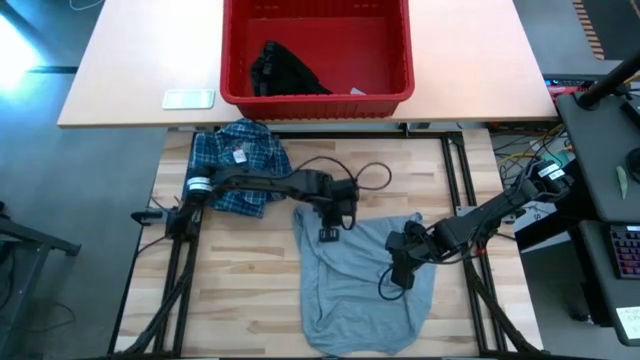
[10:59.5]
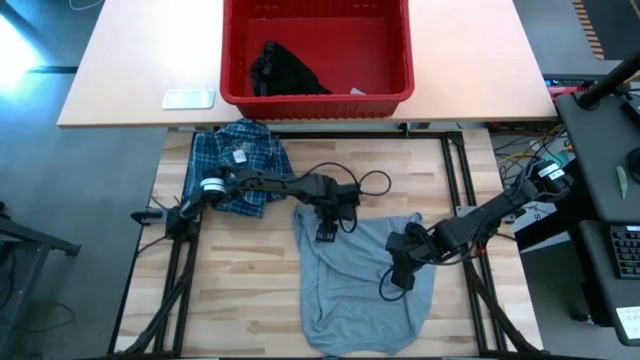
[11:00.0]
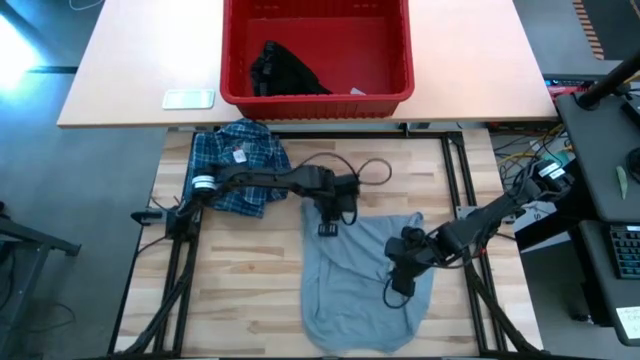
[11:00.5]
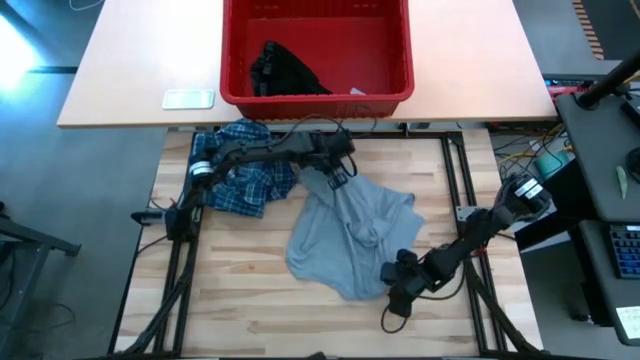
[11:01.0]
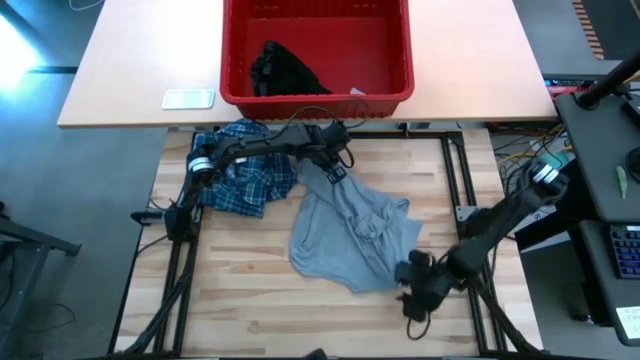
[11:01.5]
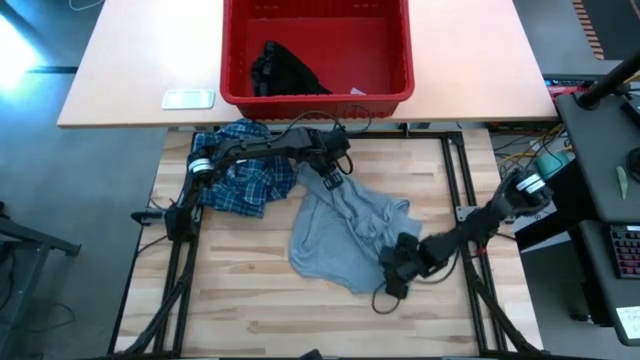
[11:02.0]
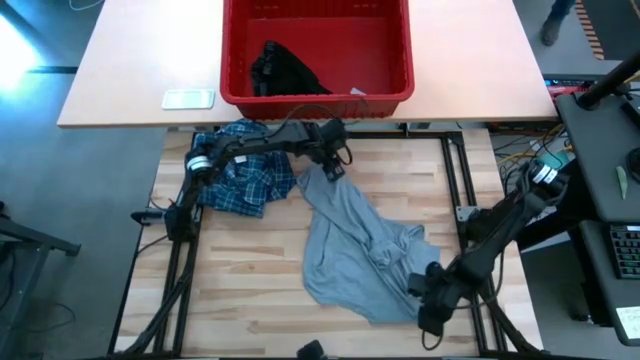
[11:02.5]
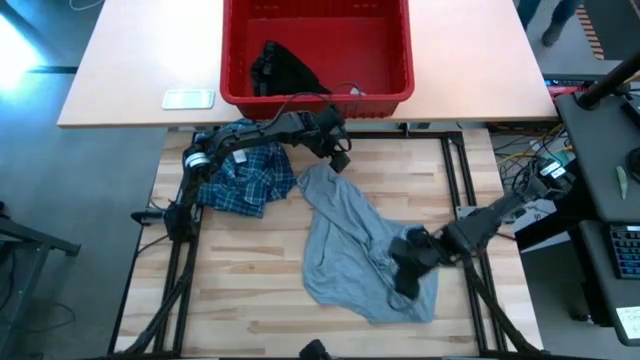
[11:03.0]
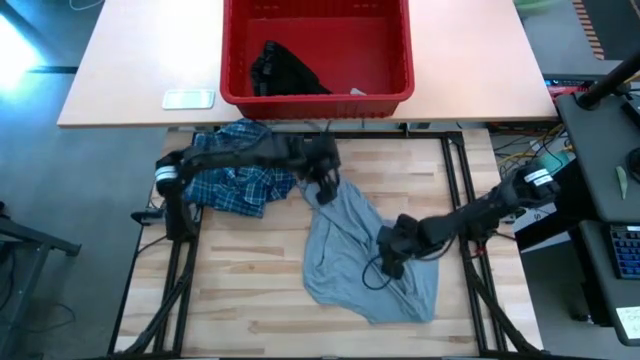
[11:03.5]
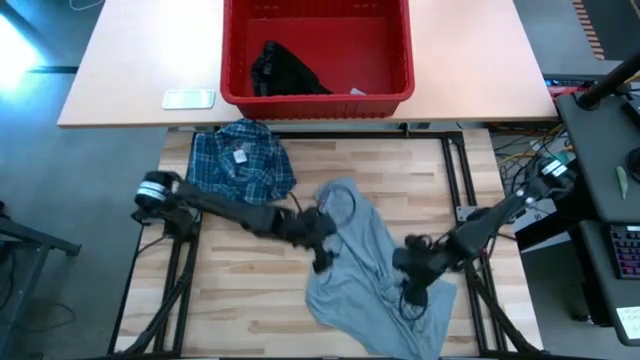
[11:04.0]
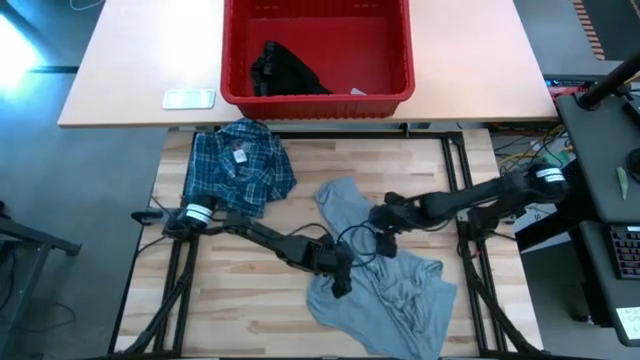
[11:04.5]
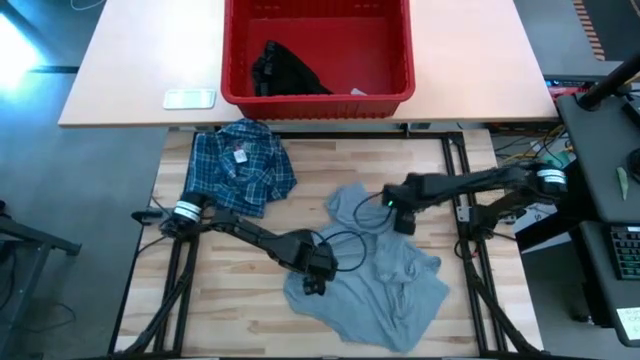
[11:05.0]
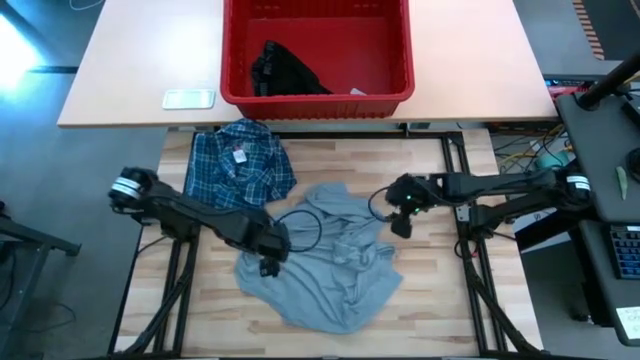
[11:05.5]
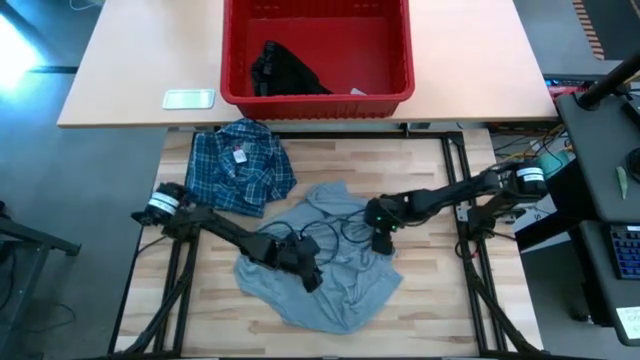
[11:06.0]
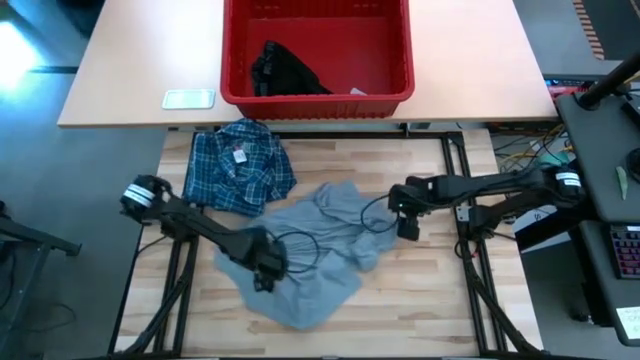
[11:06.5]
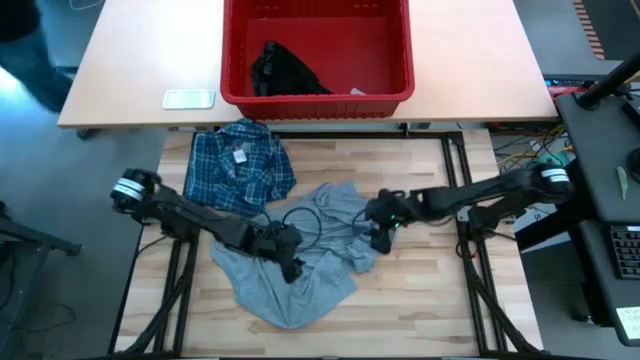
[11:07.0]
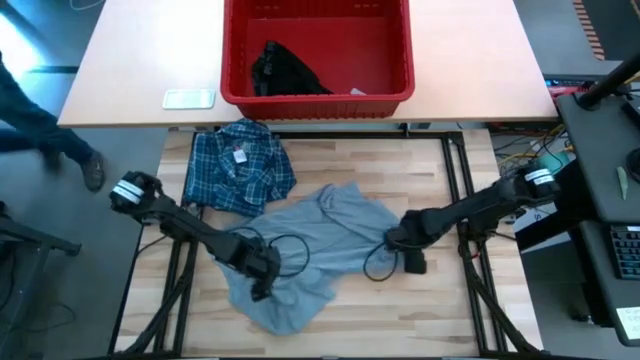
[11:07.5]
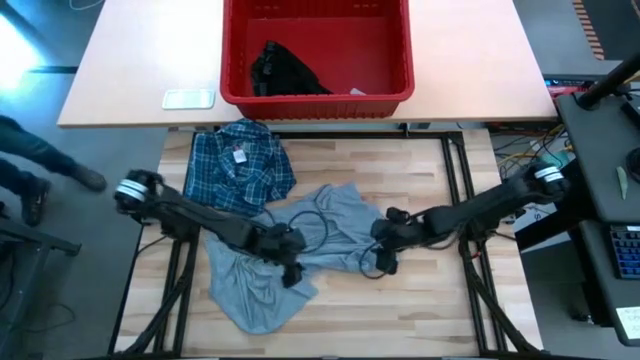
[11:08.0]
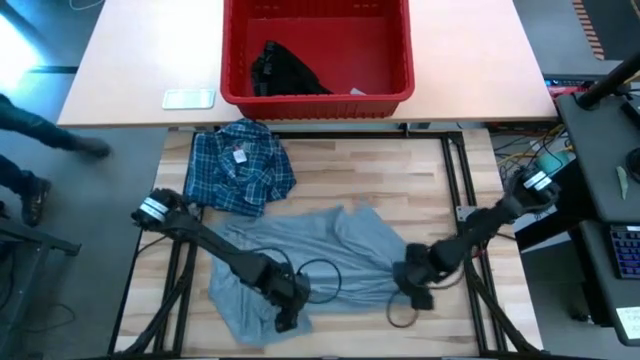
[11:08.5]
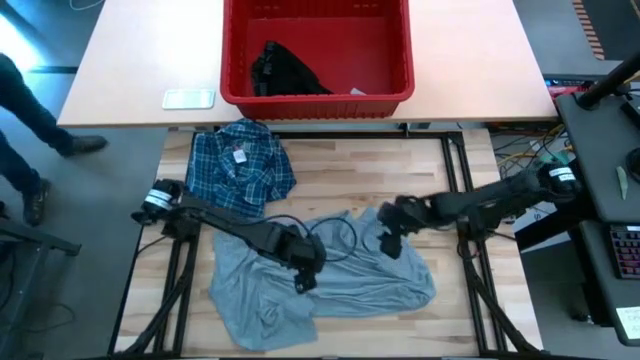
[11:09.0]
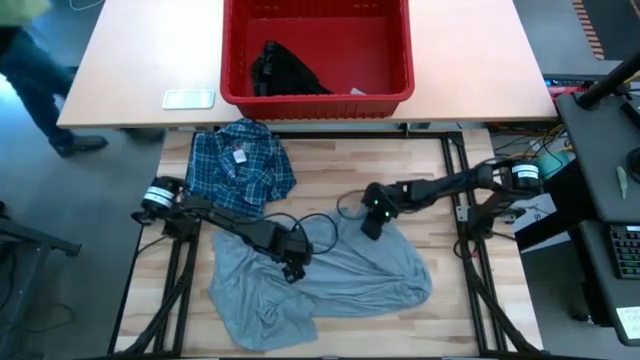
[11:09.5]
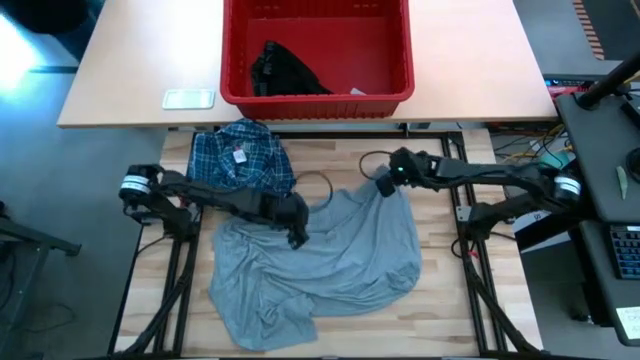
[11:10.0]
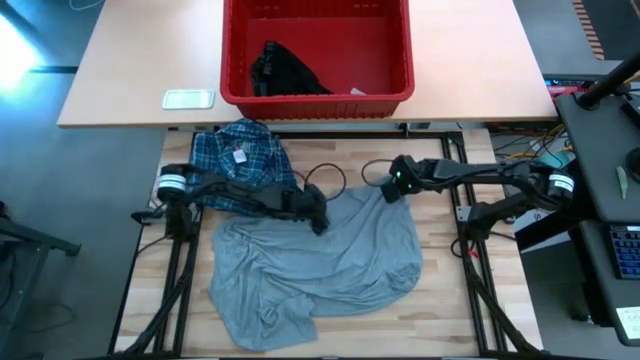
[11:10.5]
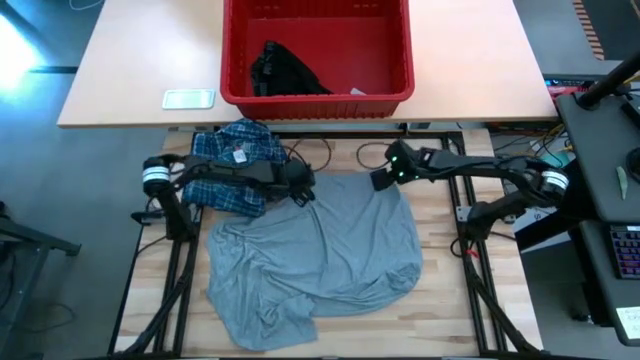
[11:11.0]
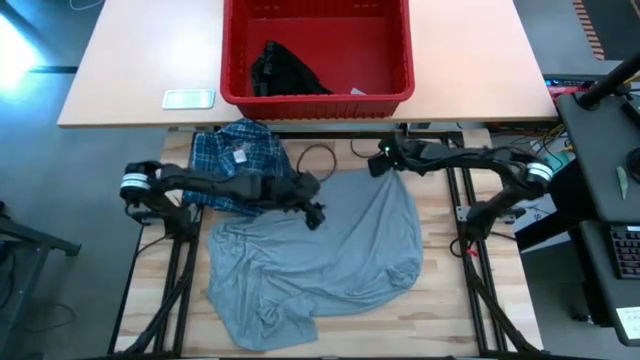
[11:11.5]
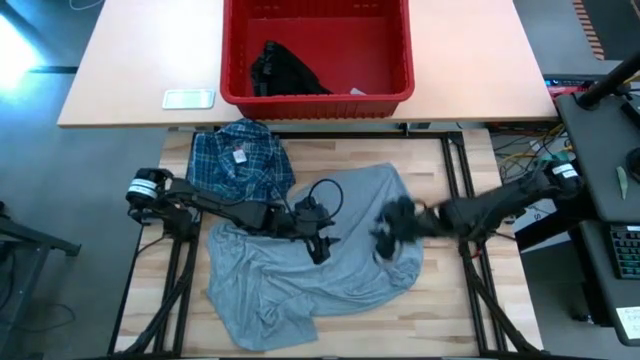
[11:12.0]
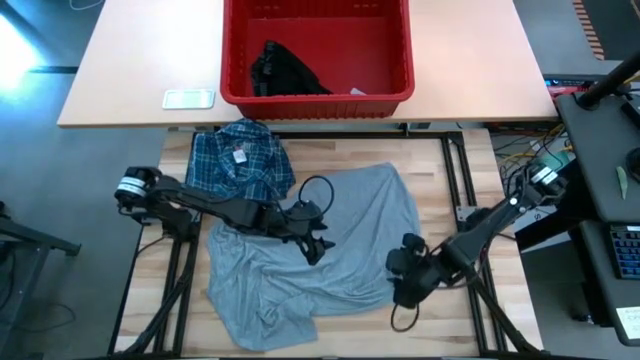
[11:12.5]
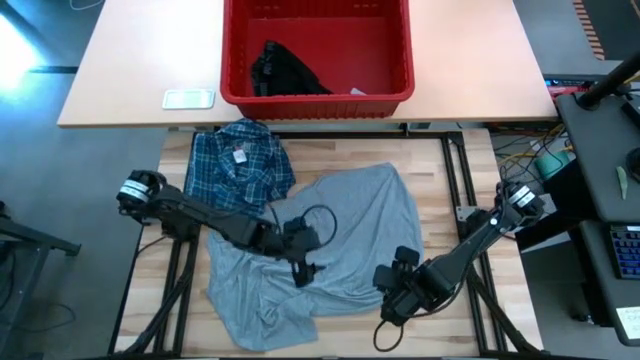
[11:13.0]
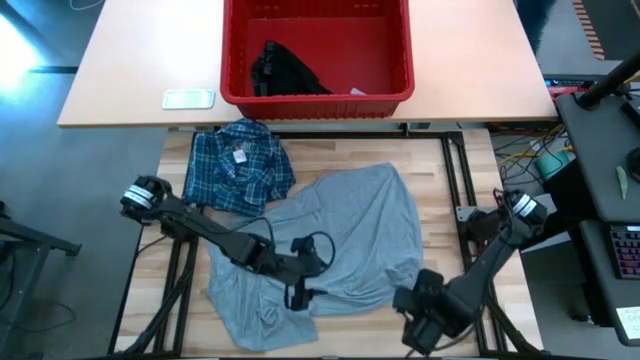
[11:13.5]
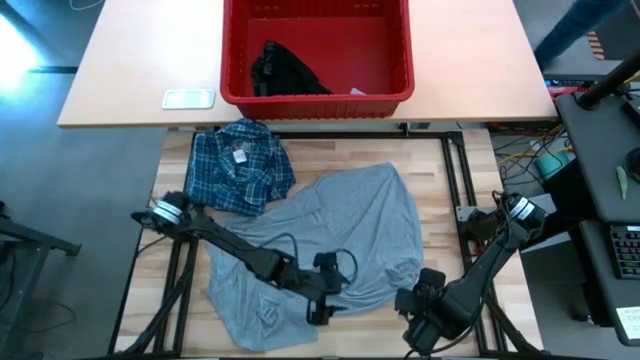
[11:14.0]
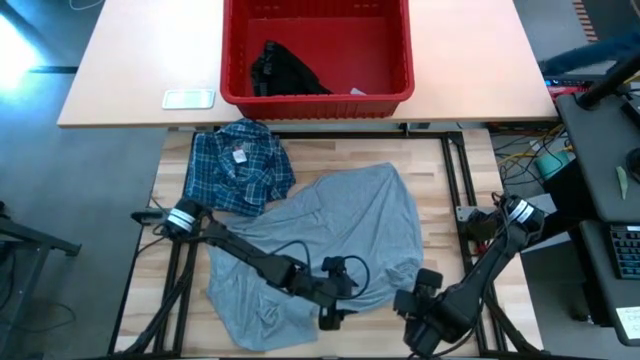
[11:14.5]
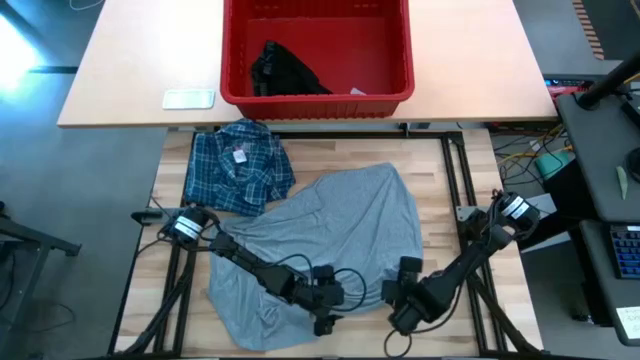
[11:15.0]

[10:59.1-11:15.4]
Task: Fold Laundry from Bin
Fold the gray shirt

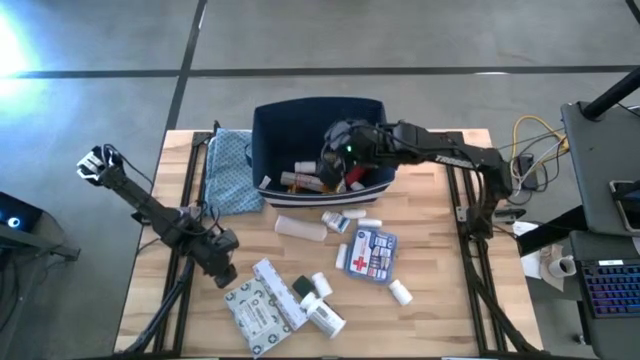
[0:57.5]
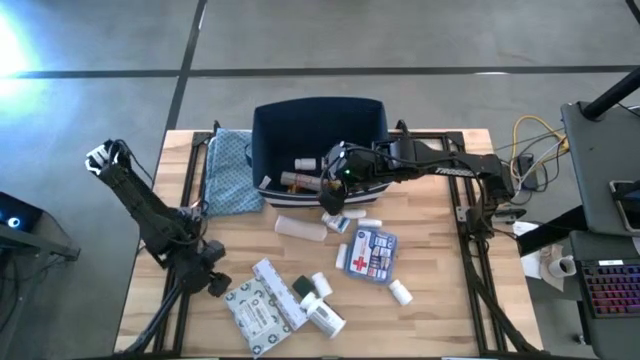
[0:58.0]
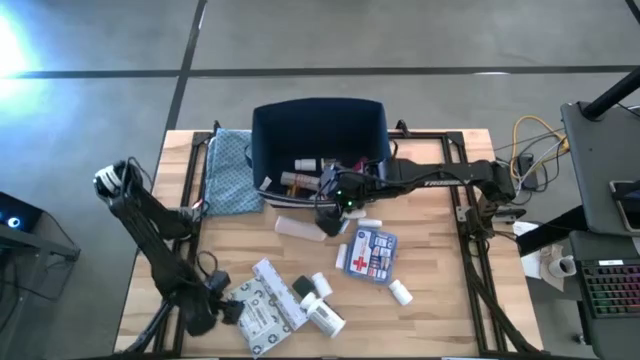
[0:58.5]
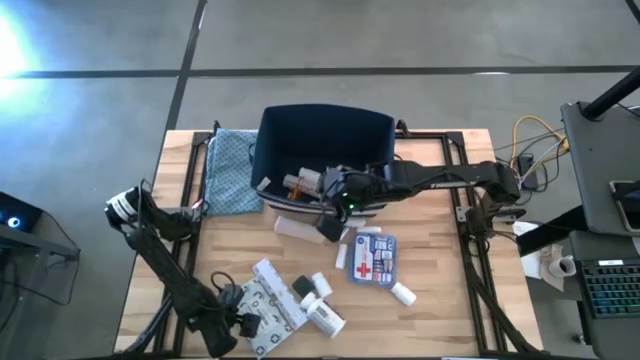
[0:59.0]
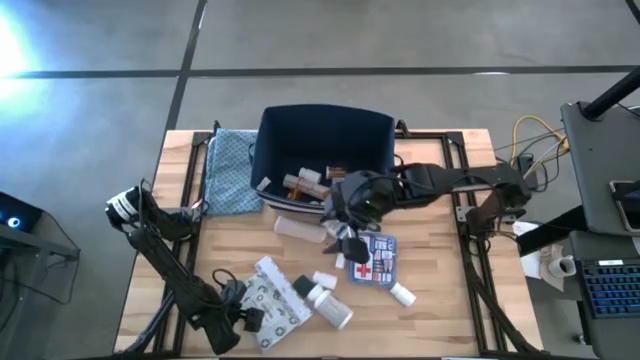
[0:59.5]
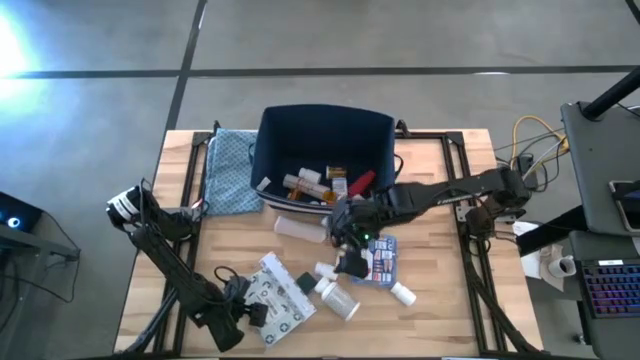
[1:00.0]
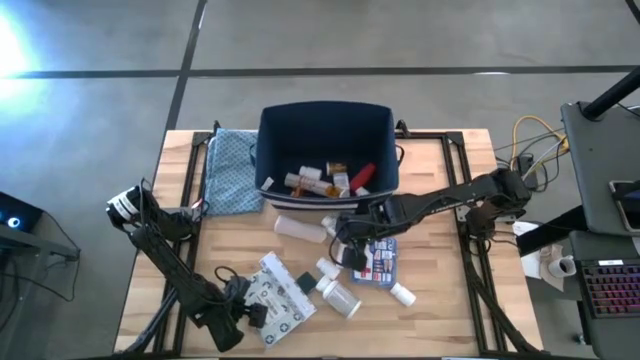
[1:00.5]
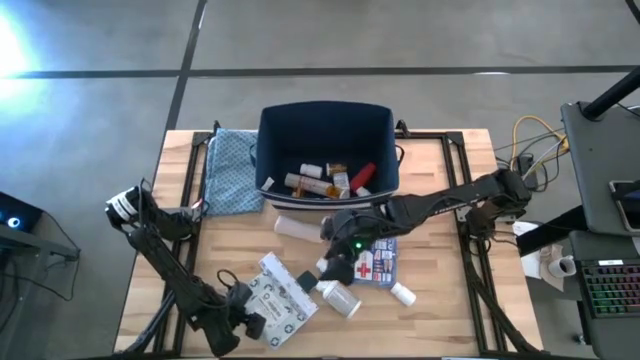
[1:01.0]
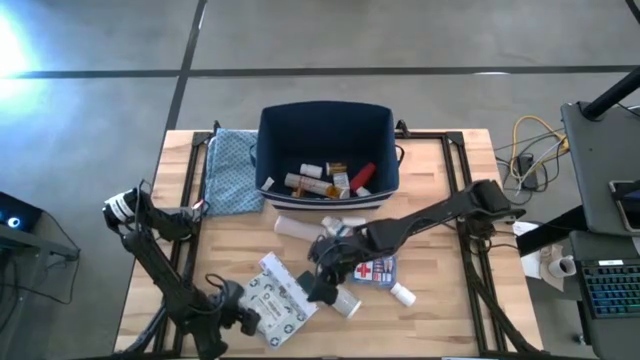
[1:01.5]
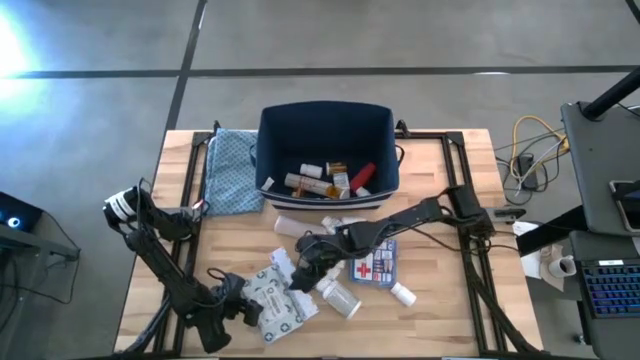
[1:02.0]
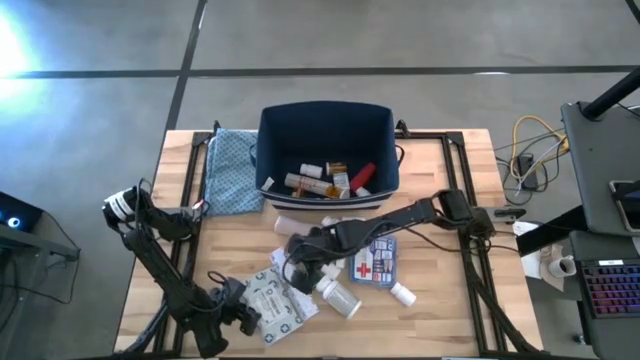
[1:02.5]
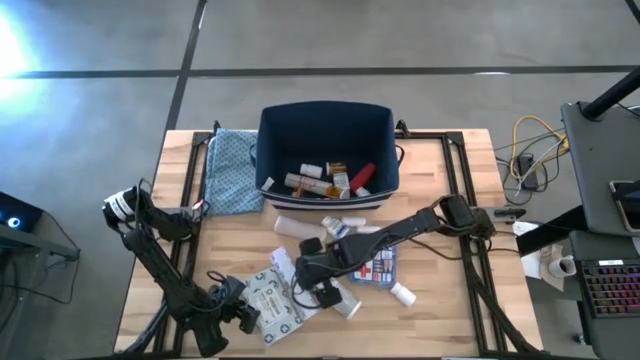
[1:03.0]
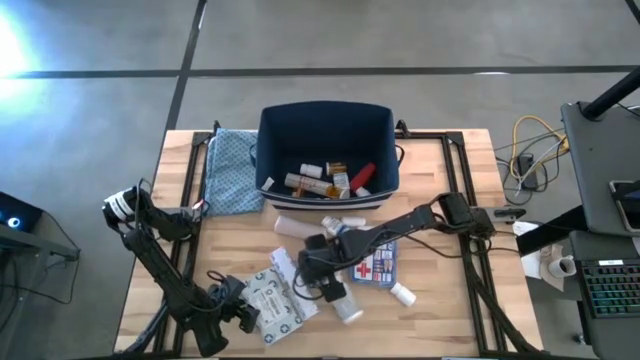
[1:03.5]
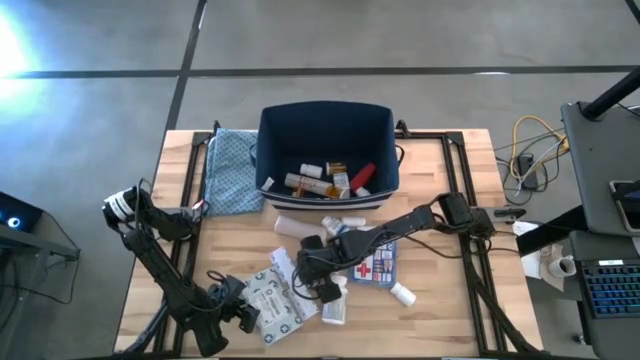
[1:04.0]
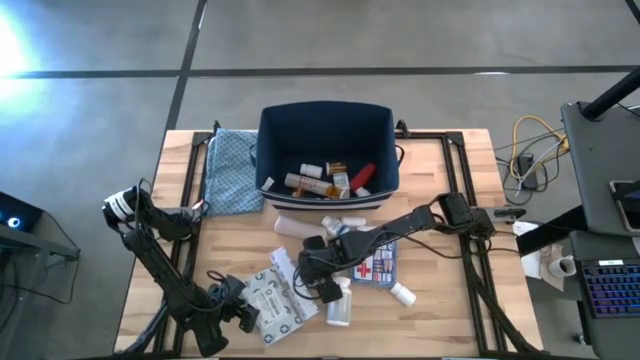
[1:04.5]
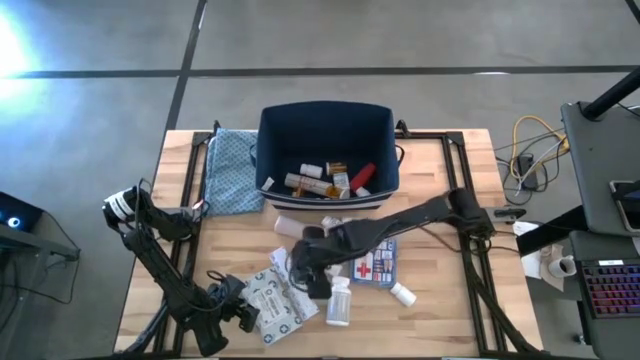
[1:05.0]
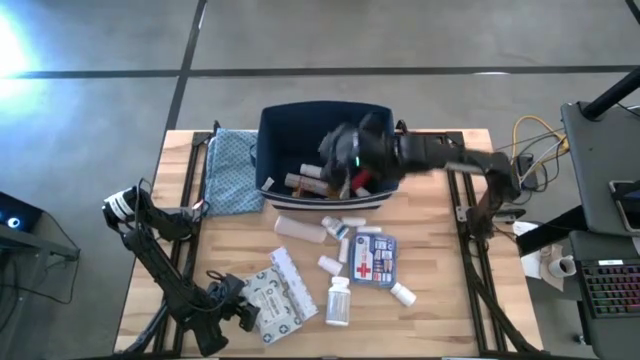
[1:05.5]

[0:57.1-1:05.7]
Task: Pick & place medical supplies in basket/bin
Put the green bandage into the blue bin
